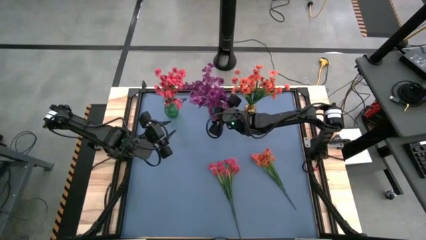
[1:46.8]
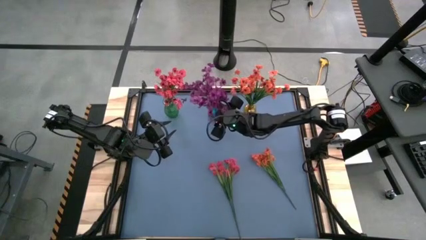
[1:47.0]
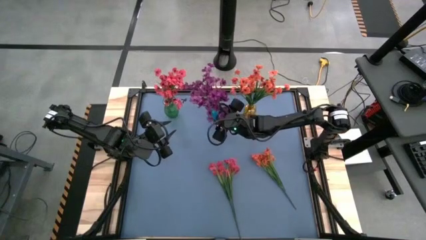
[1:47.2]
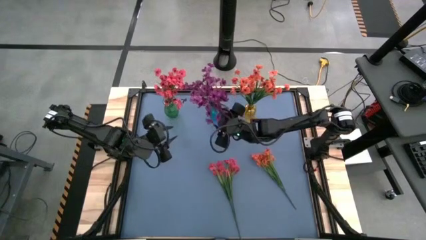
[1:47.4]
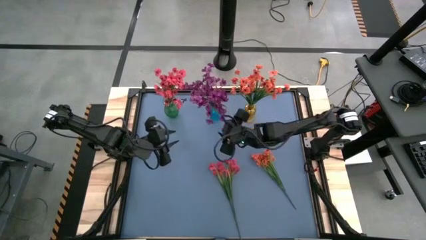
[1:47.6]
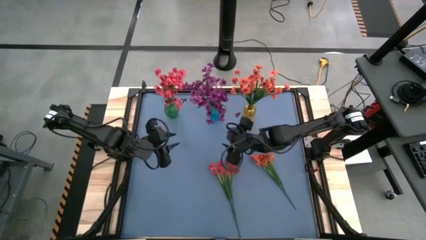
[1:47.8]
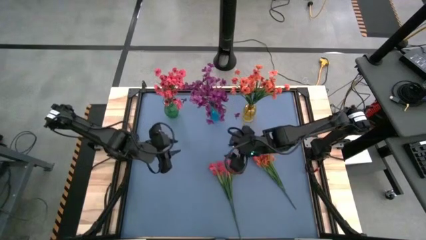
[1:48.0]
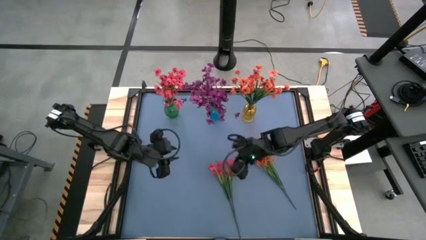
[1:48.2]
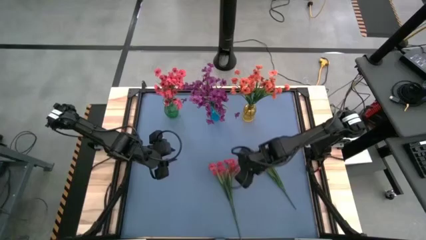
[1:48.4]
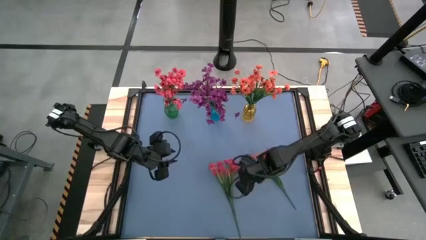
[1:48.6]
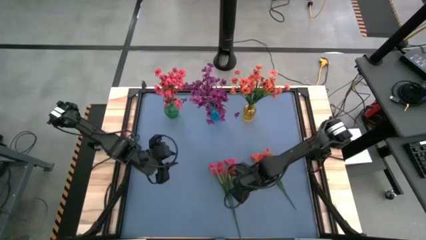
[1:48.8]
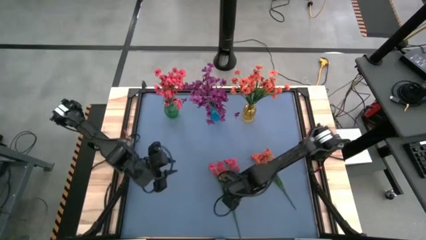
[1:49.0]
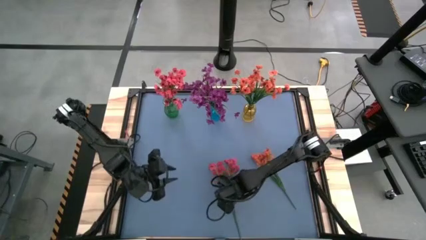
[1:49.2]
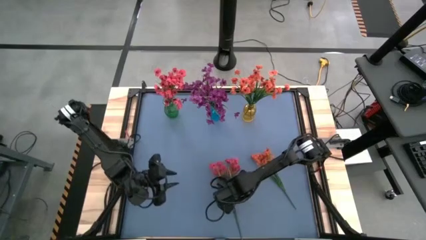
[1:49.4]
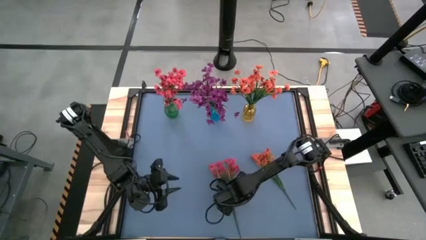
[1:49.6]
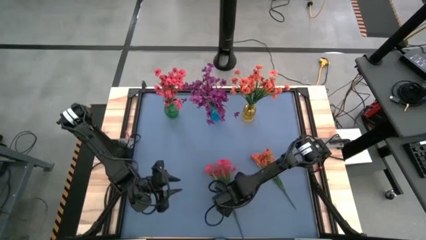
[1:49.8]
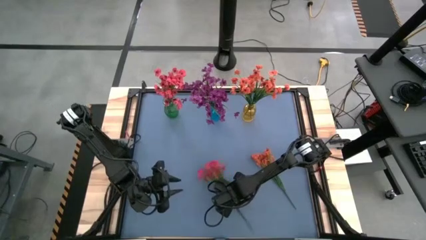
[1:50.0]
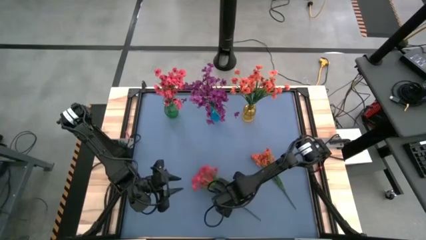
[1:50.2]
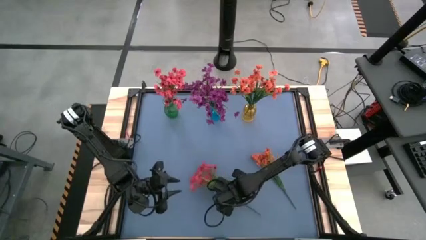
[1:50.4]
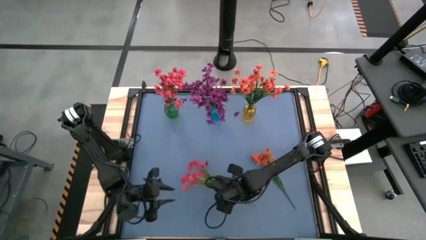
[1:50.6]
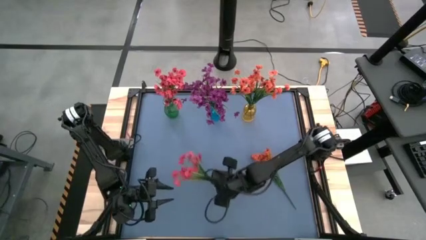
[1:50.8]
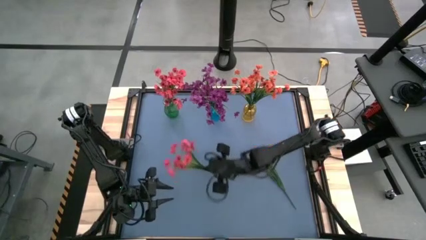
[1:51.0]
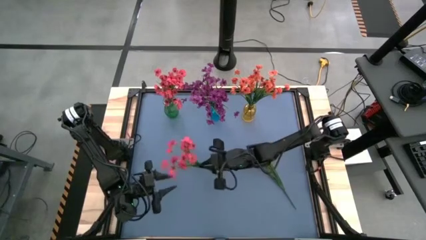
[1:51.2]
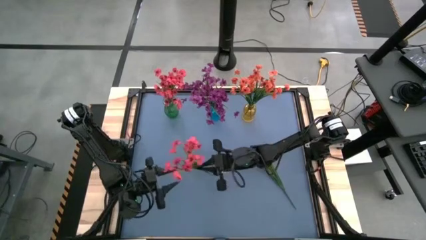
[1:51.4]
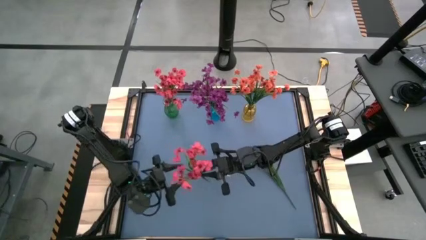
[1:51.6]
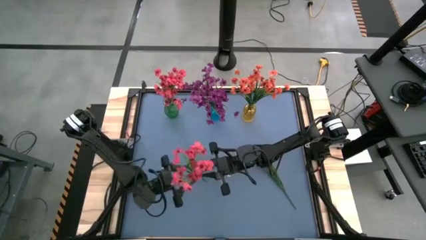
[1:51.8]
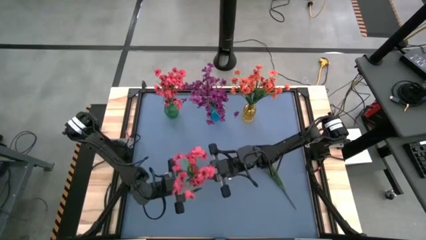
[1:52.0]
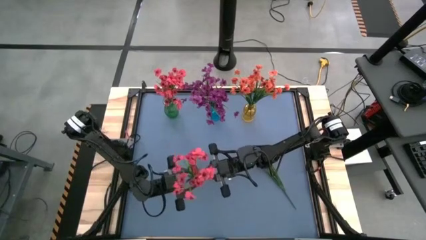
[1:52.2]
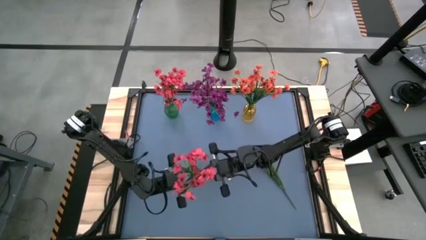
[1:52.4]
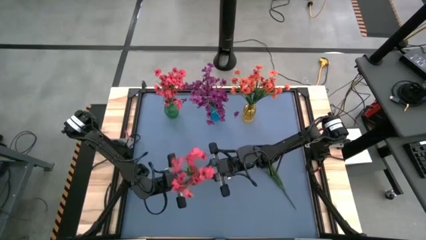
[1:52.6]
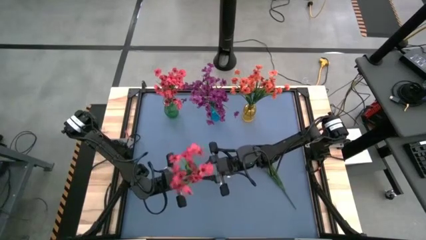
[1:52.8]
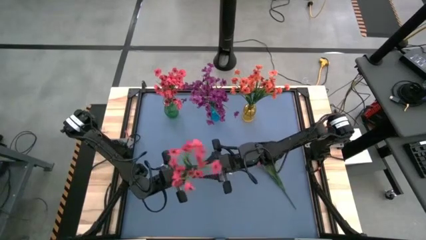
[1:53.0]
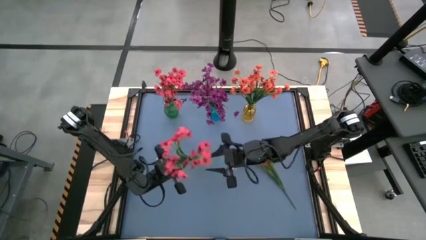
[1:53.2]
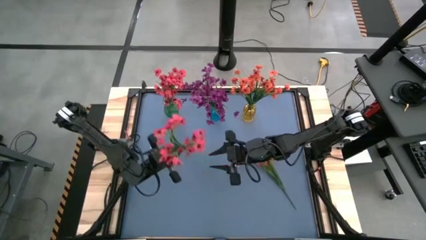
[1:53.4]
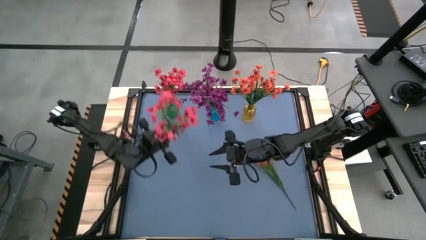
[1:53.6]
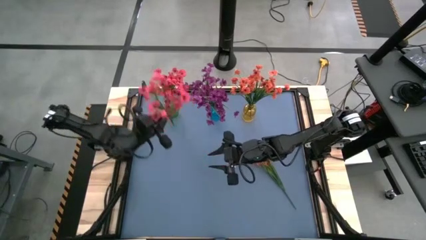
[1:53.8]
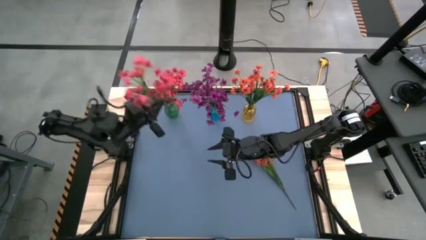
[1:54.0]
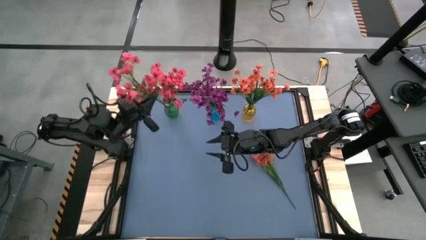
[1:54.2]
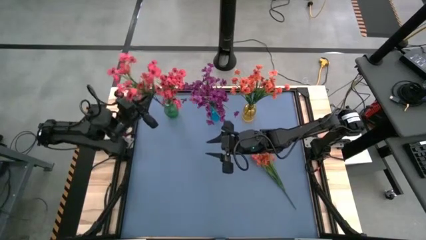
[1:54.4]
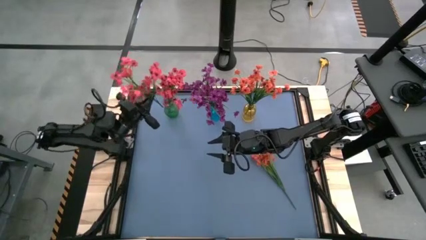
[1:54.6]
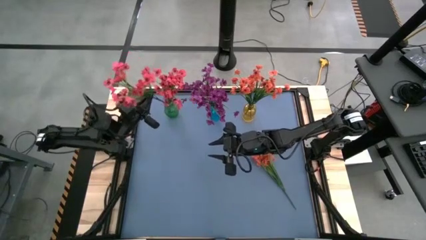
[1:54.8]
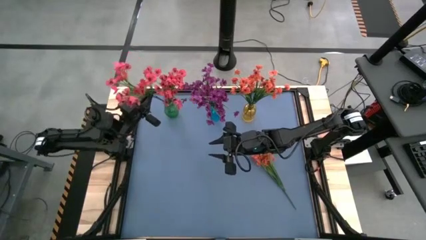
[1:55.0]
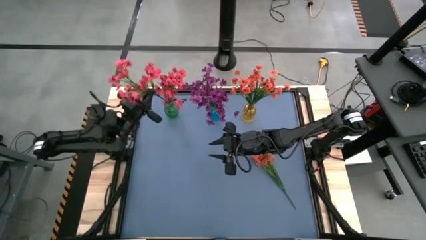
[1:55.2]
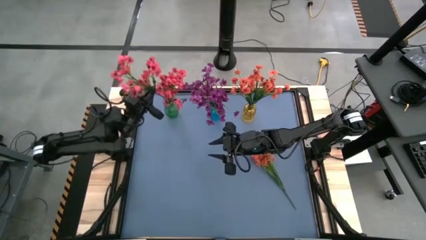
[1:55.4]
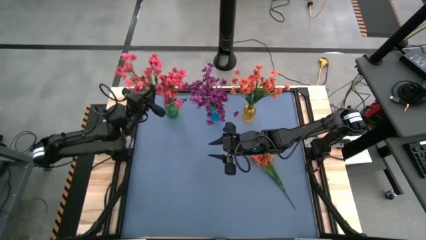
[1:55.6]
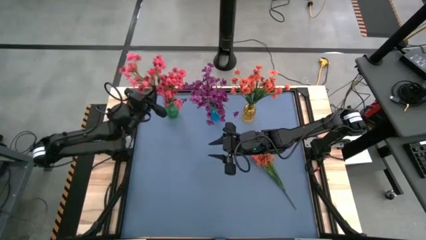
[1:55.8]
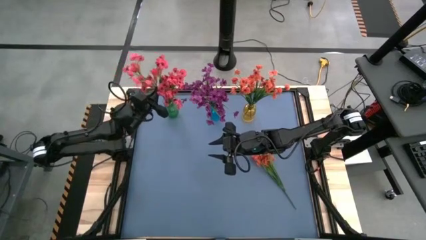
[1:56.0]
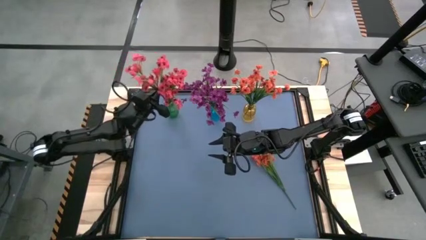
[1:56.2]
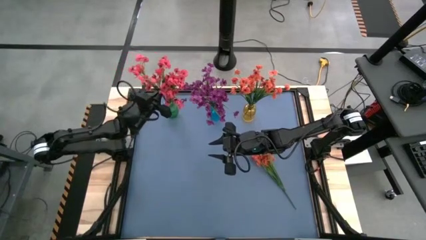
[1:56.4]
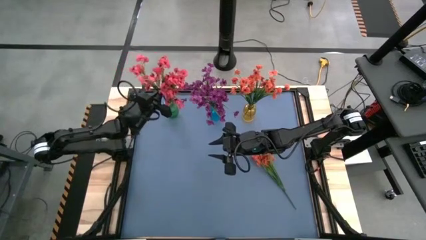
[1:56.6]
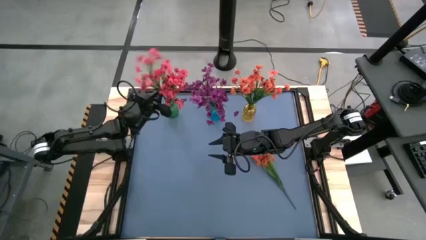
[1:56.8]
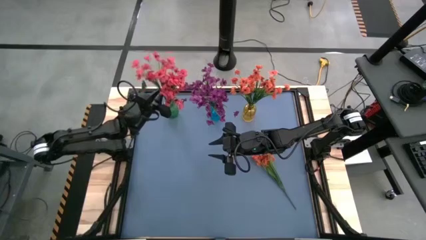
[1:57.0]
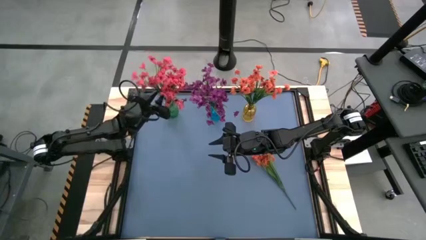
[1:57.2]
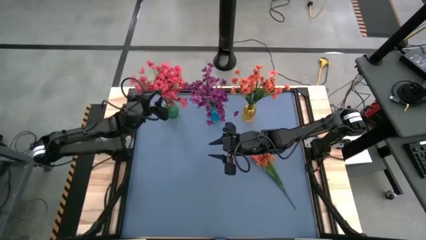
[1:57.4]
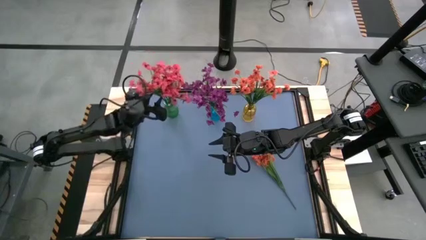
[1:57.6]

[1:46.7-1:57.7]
Task: Sort flowers into vase by color
Put the pink flower into the green vase

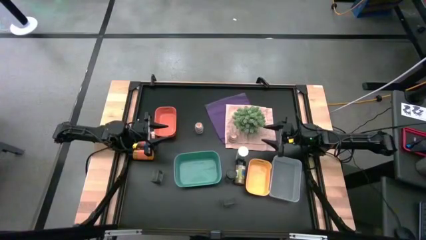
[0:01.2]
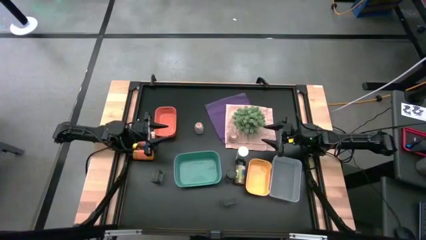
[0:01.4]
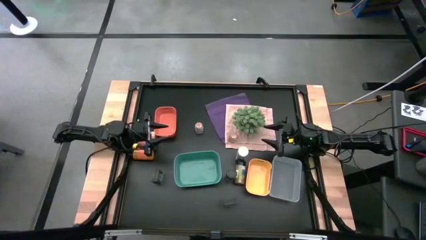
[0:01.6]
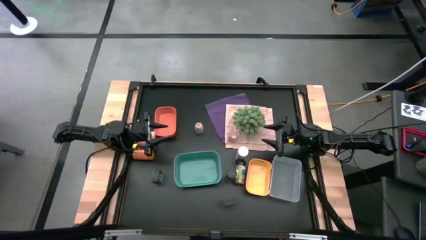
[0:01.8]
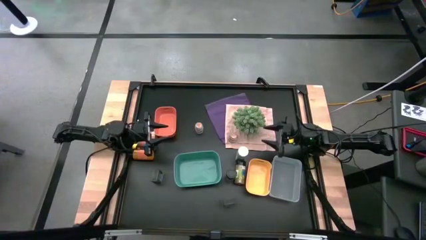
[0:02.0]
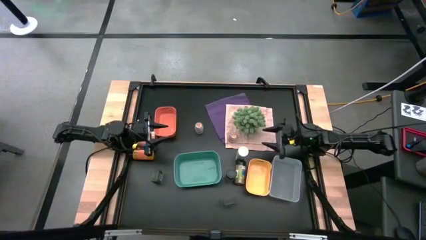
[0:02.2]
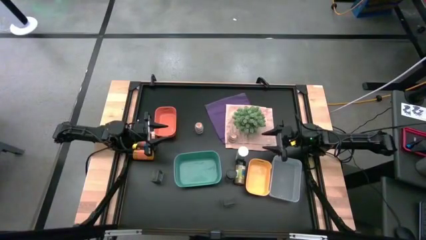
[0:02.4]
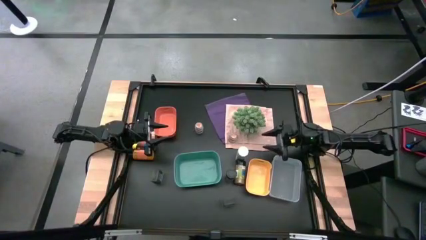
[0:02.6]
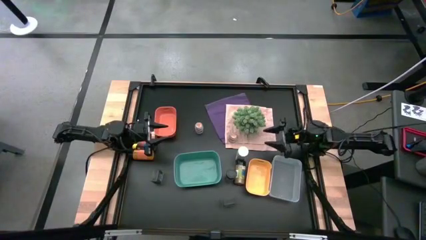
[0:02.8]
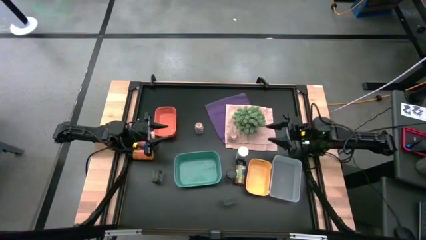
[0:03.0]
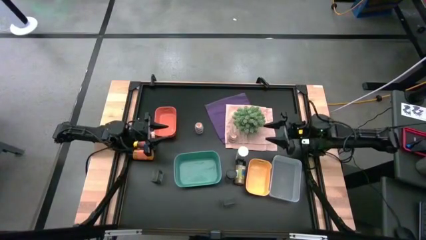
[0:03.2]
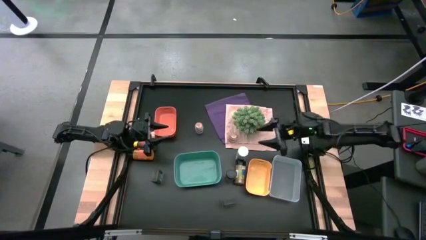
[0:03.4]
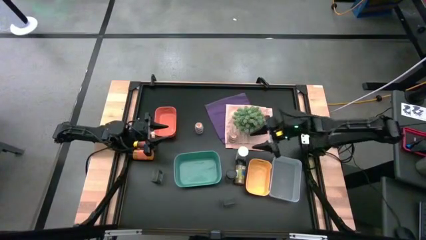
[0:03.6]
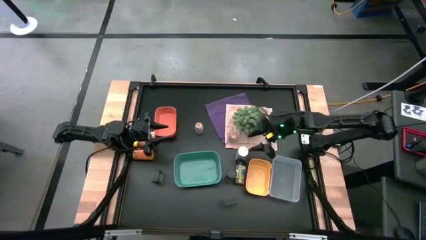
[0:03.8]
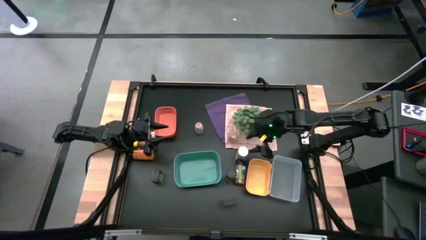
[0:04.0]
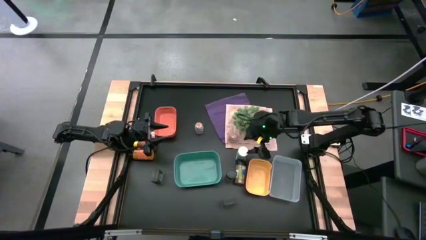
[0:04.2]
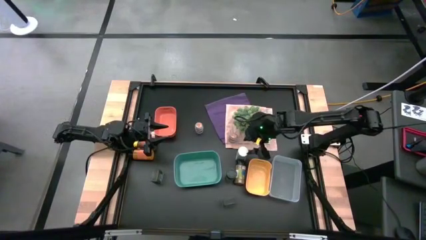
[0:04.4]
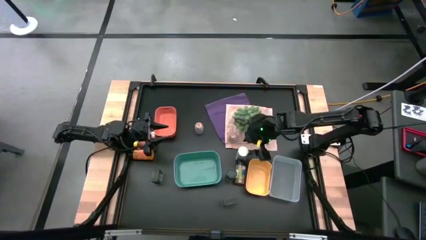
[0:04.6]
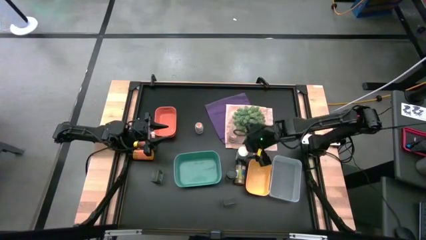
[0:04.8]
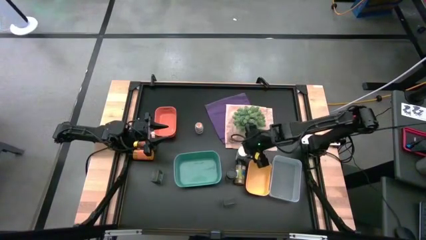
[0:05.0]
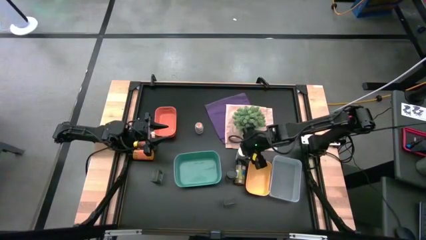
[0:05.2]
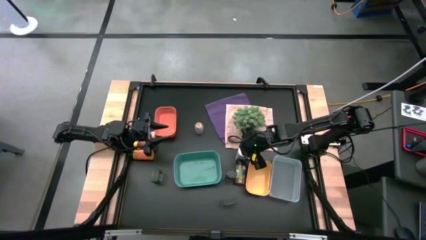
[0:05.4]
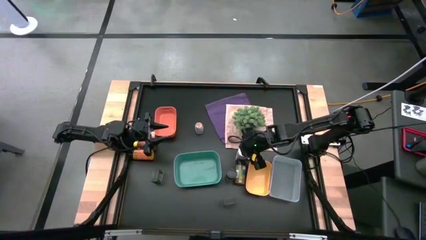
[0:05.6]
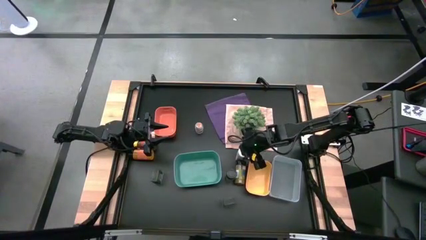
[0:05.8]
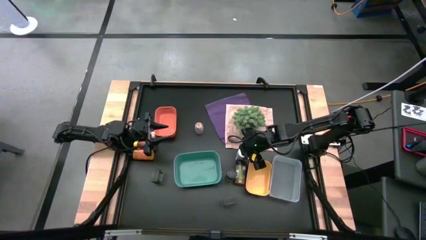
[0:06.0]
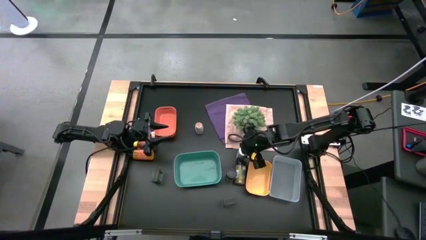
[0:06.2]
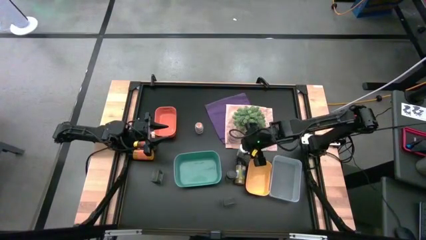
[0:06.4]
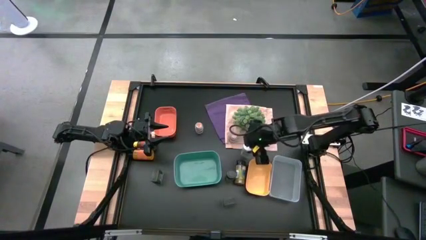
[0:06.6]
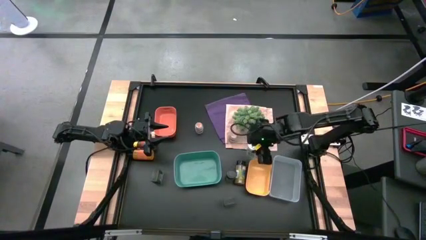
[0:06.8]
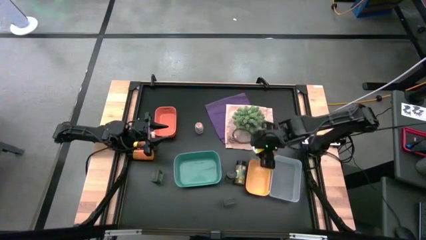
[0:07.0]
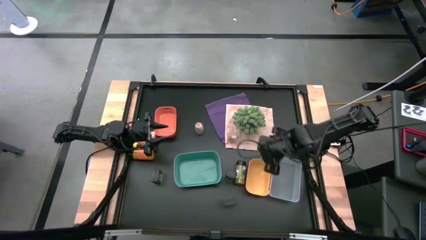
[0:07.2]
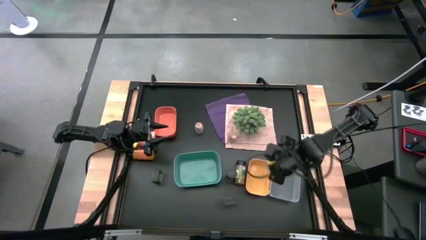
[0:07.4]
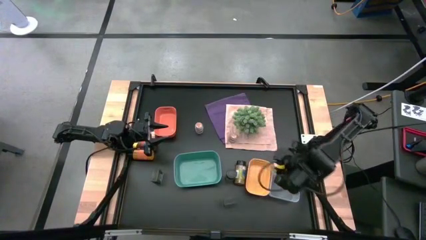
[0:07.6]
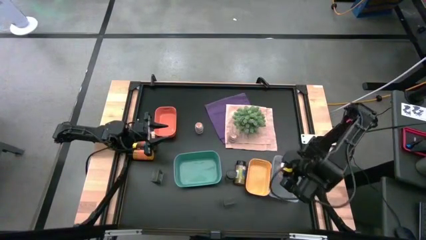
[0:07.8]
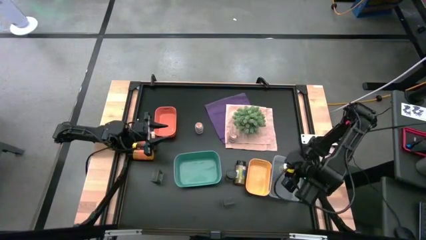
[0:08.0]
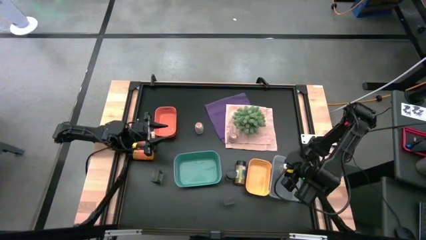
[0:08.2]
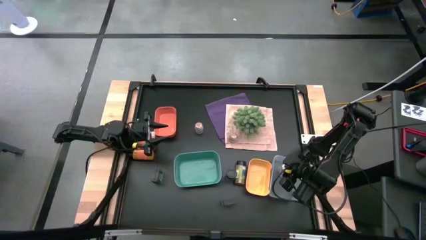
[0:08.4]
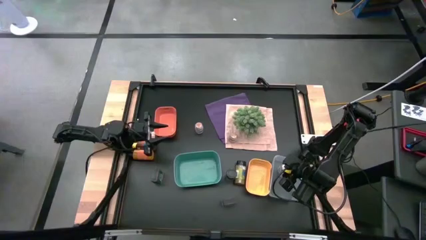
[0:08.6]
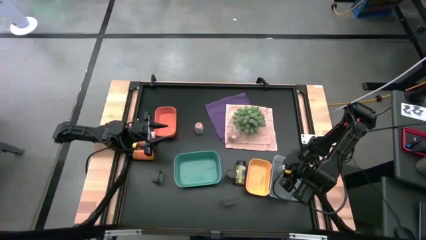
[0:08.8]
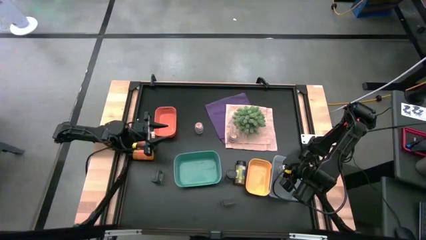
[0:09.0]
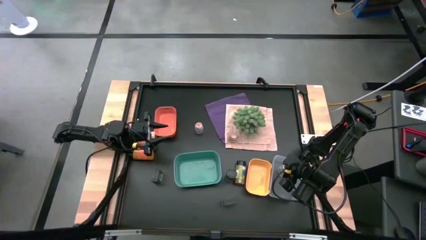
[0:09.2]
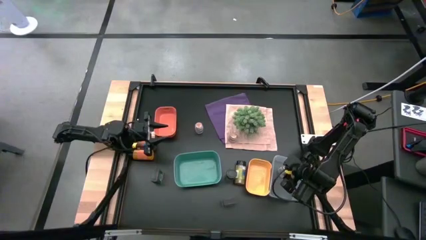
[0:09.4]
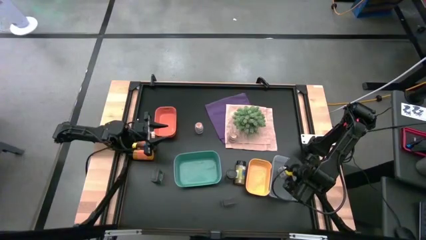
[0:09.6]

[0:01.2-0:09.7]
Task: Sort spices by type
Put the white seasoning bottle into the transparent bin
